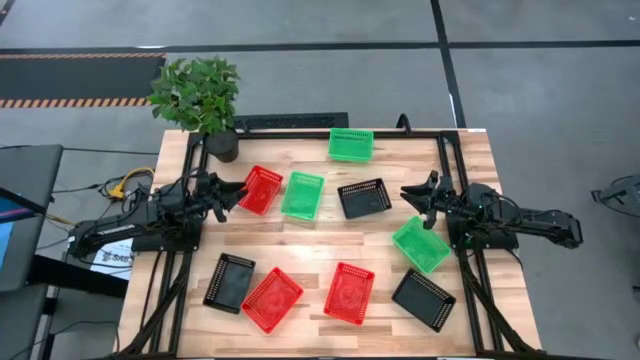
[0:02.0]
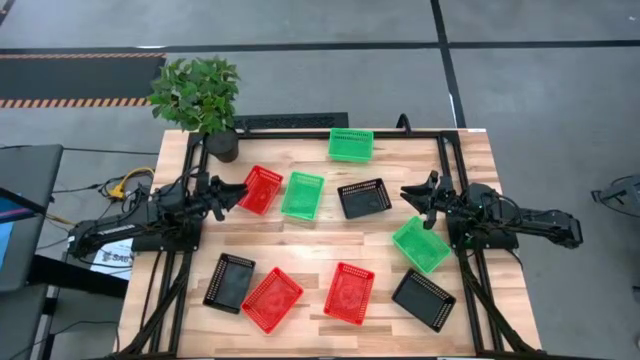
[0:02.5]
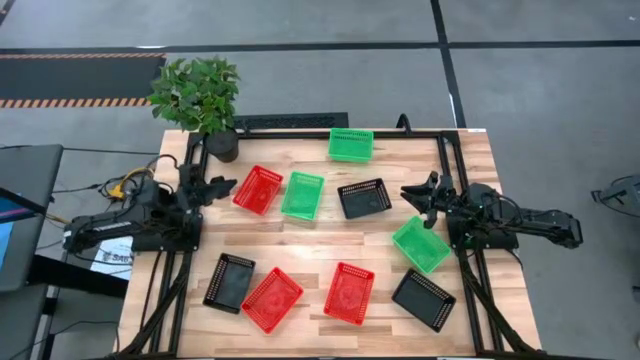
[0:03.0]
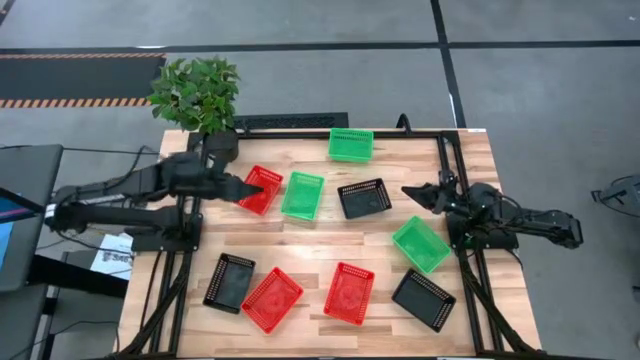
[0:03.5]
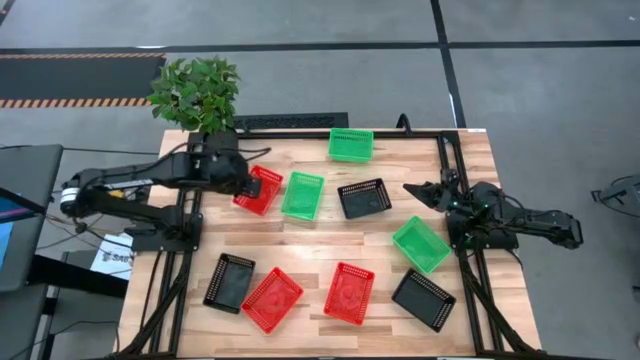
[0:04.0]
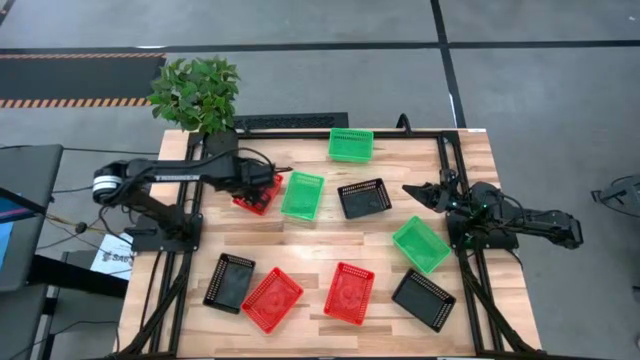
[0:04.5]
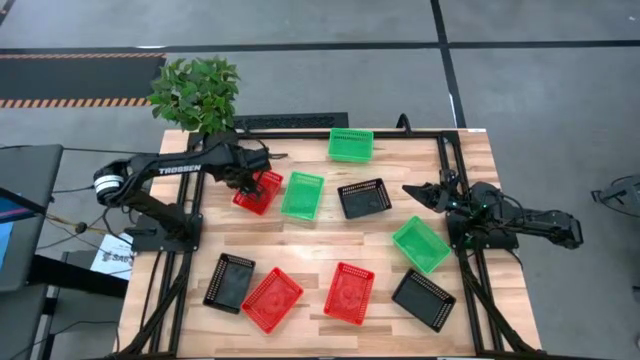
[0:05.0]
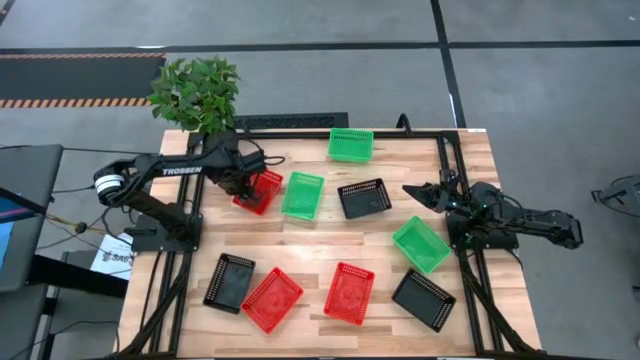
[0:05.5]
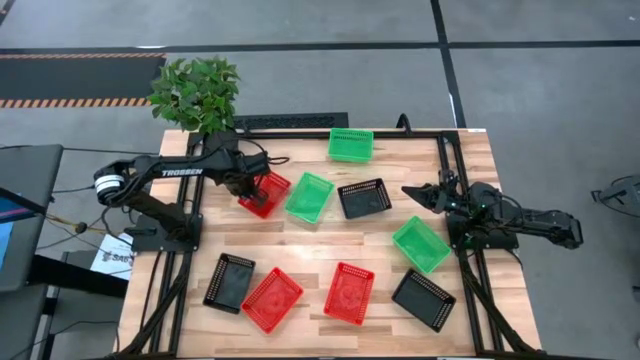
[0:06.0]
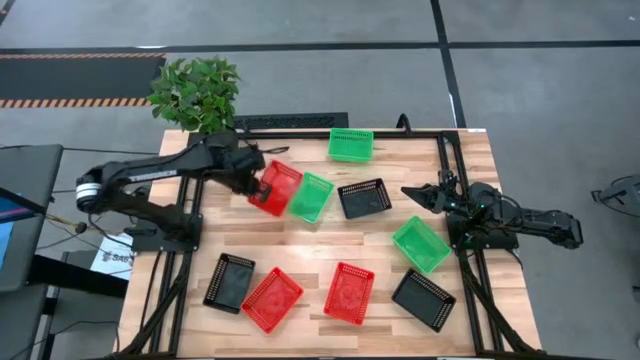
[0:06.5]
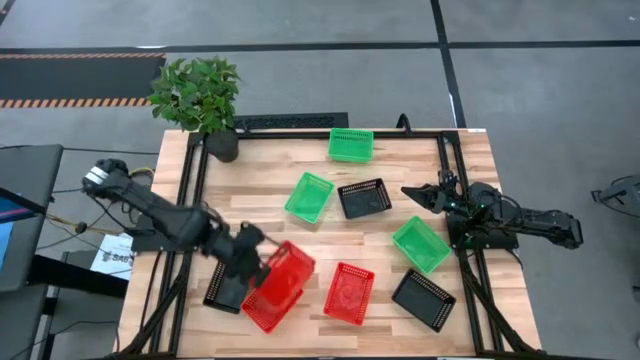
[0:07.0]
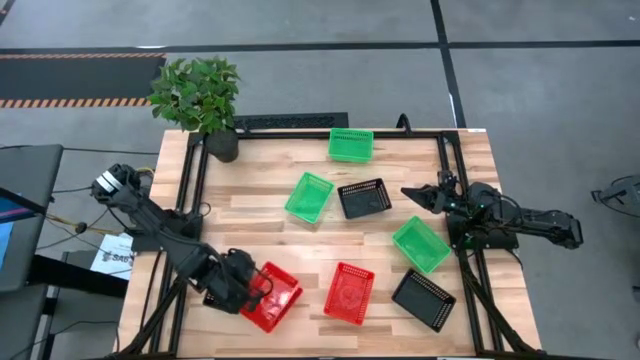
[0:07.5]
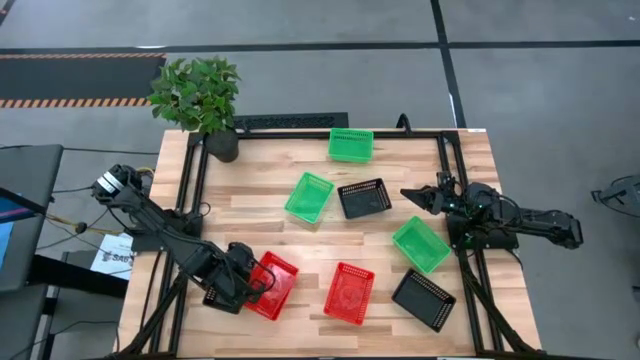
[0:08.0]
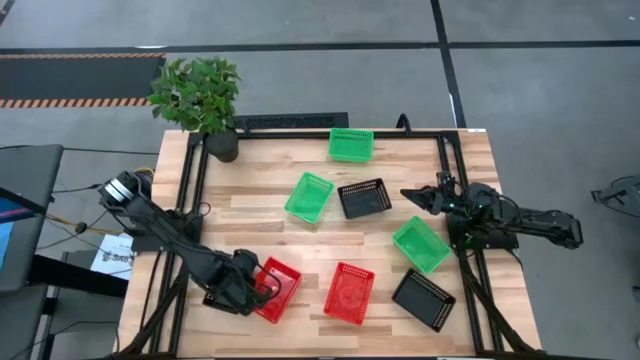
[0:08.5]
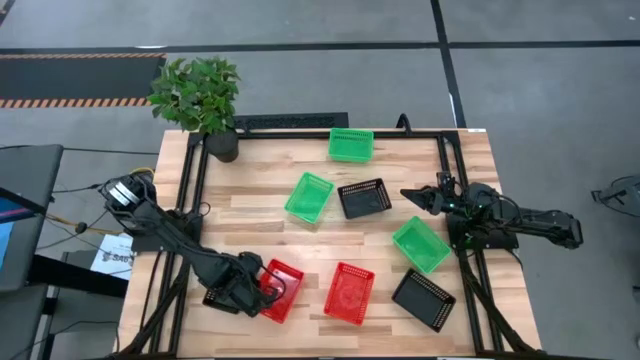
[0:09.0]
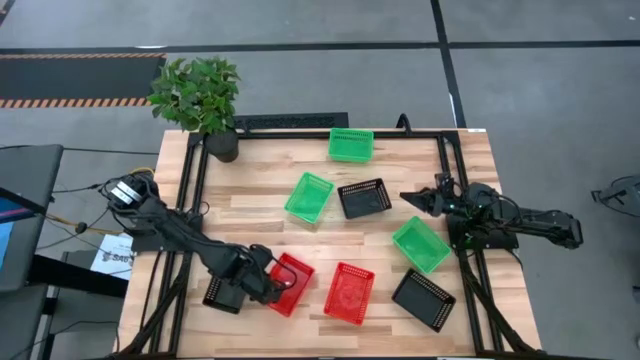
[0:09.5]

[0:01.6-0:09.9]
Stack the top red bin on top of the bottom left red bin

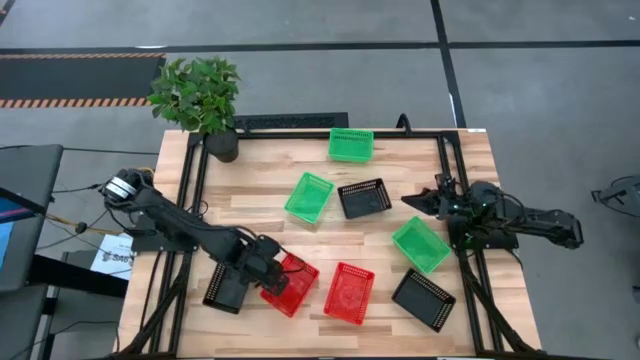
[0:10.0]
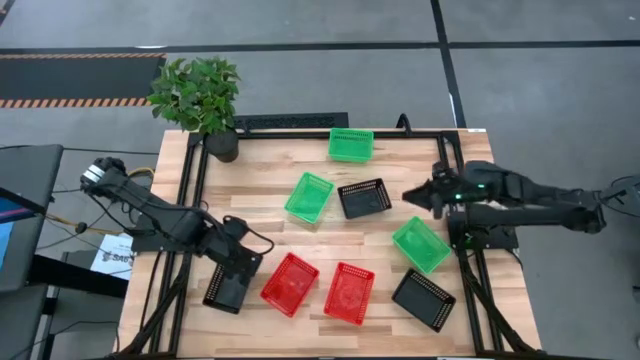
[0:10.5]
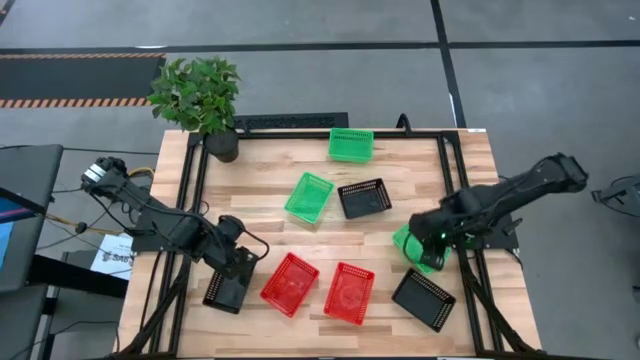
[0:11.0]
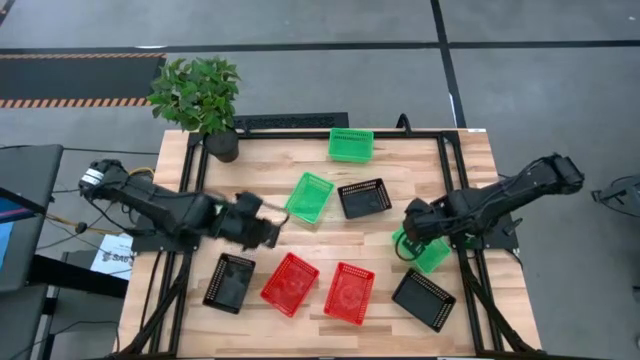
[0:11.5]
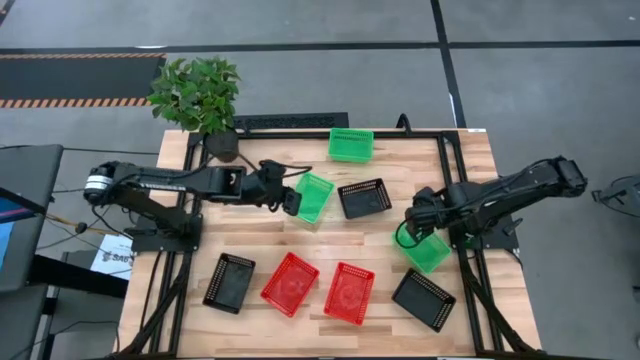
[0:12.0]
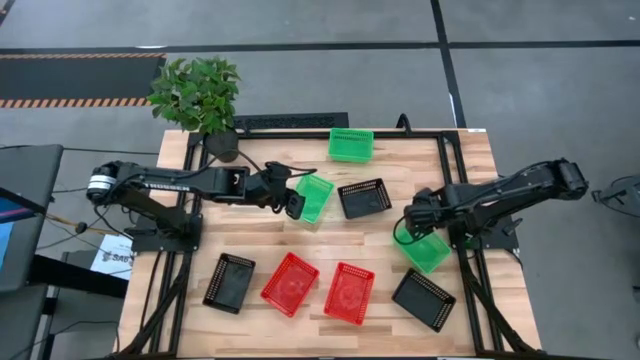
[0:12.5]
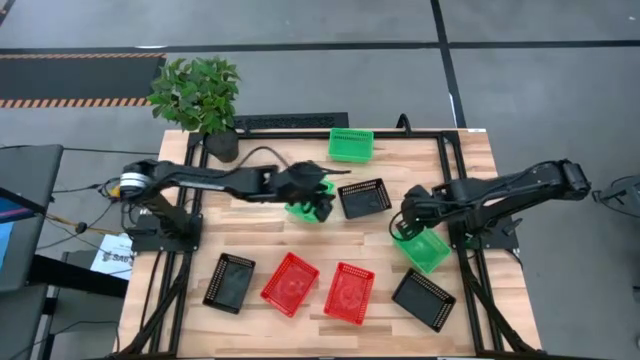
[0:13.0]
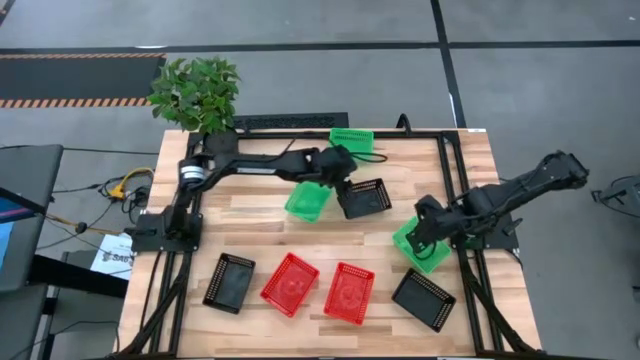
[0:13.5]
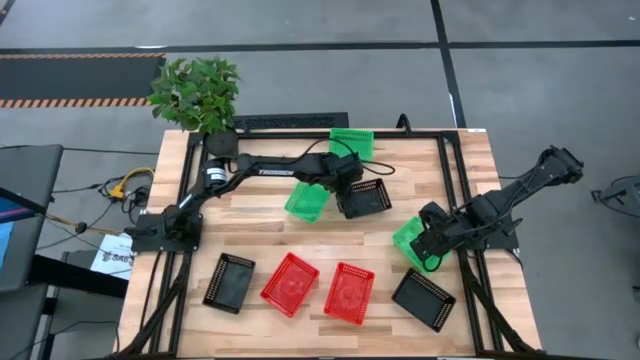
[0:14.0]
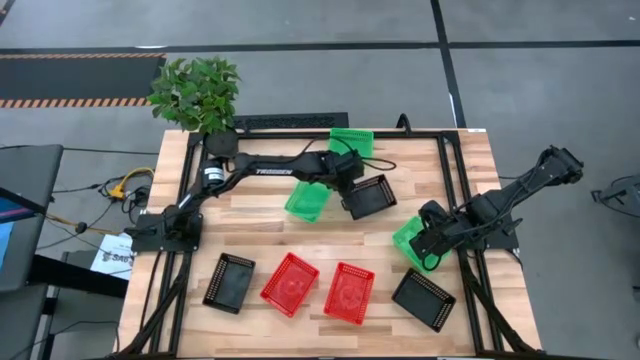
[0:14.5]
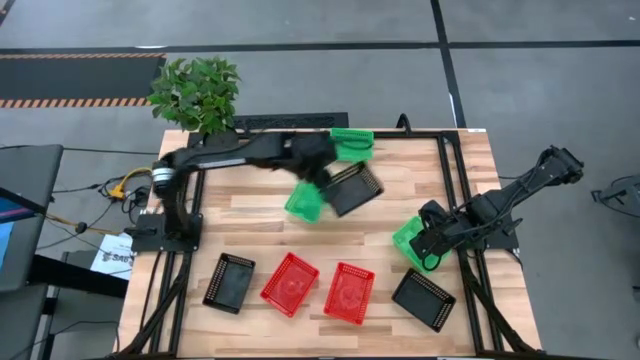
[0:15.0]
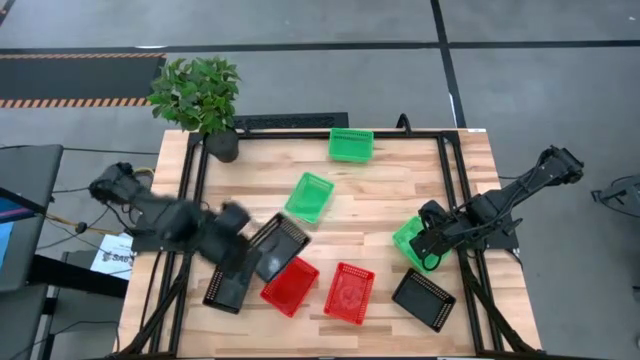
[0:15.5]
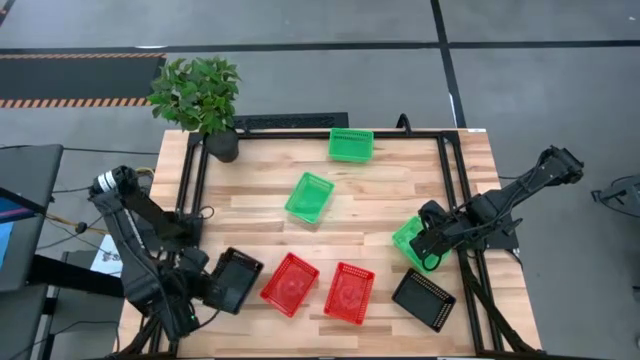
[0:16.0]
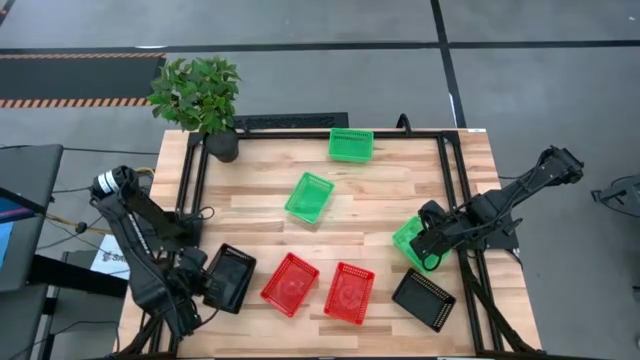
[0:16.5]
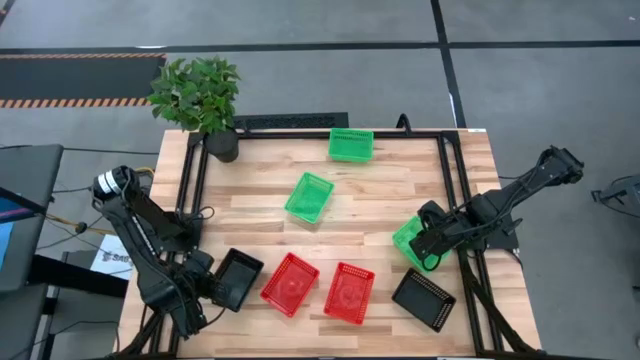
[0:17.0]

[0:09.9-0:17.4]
Stack the top black bin on top of the bottom left black bin

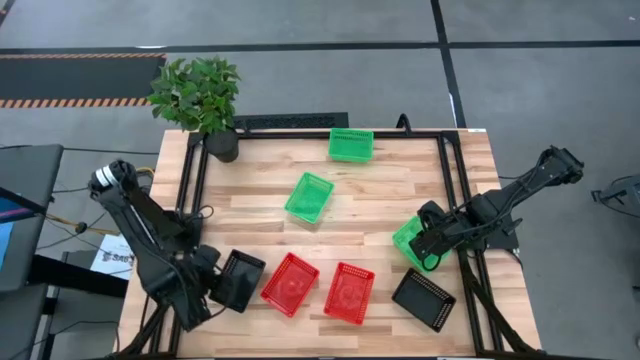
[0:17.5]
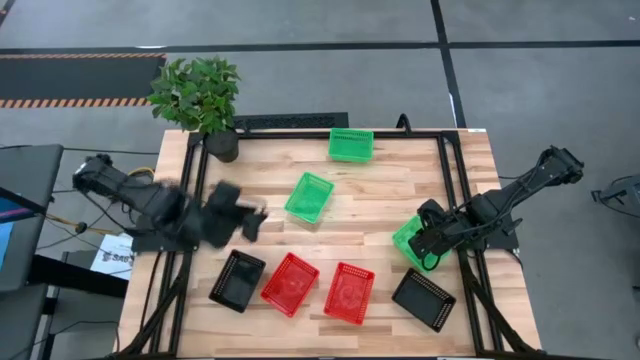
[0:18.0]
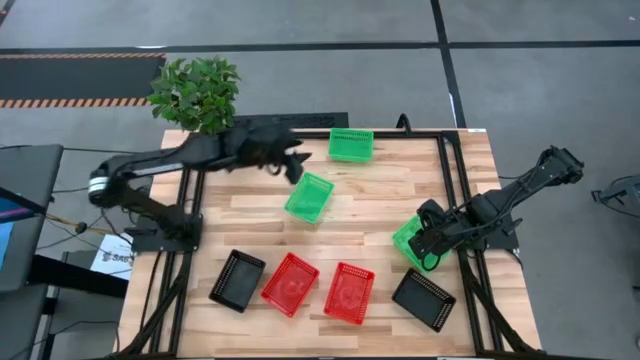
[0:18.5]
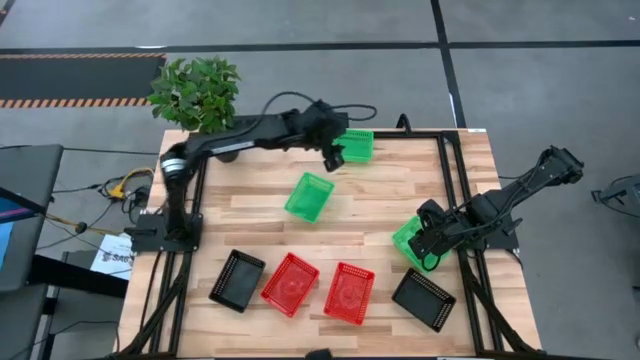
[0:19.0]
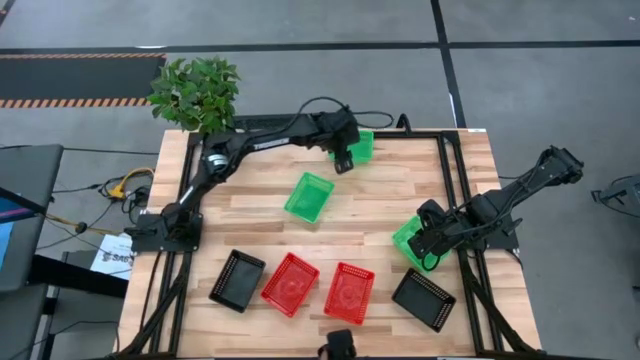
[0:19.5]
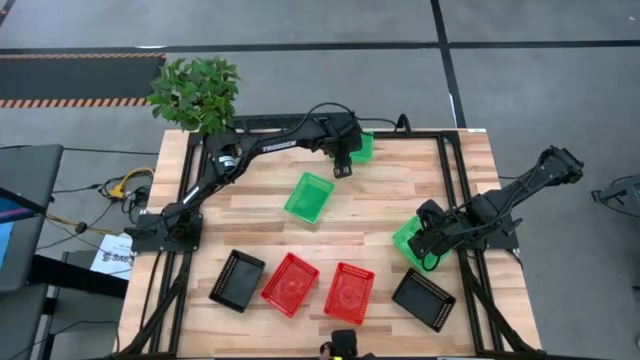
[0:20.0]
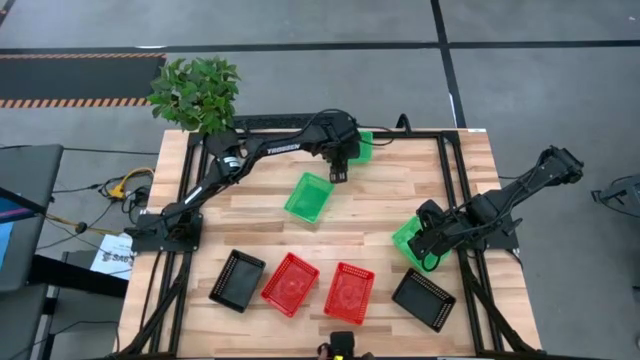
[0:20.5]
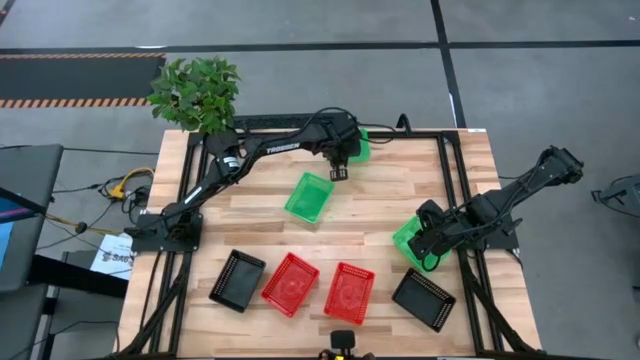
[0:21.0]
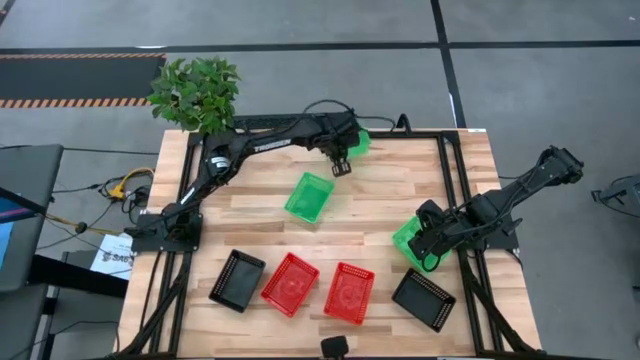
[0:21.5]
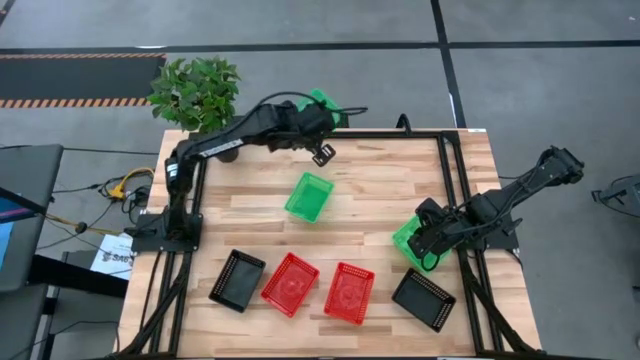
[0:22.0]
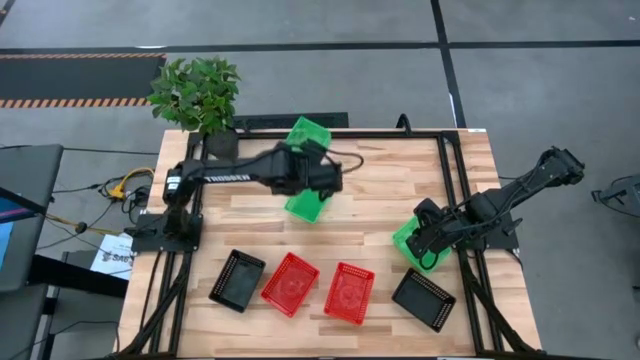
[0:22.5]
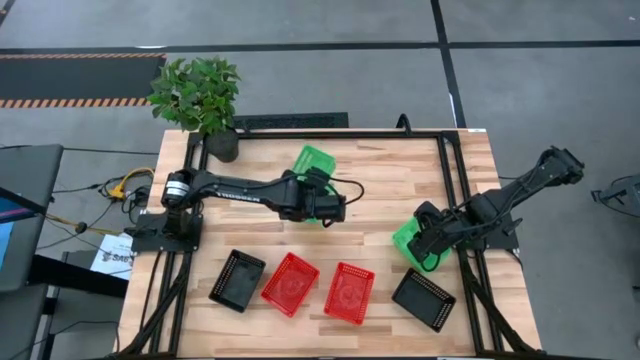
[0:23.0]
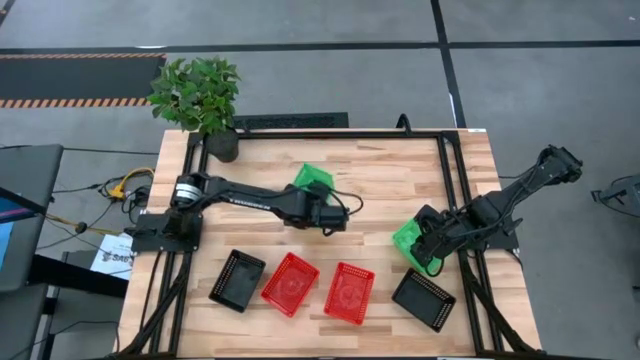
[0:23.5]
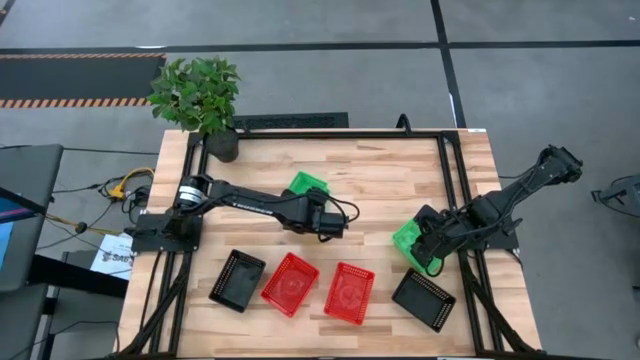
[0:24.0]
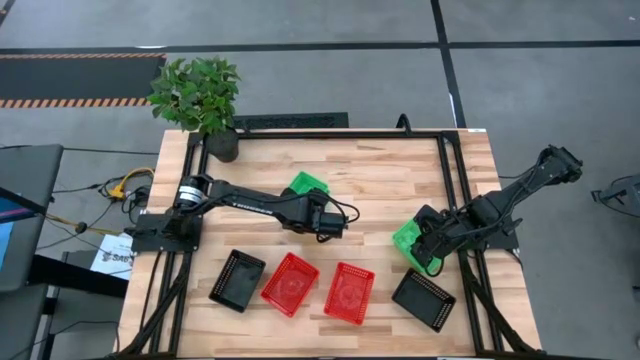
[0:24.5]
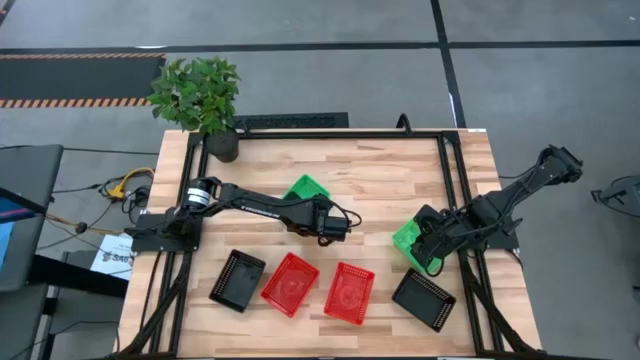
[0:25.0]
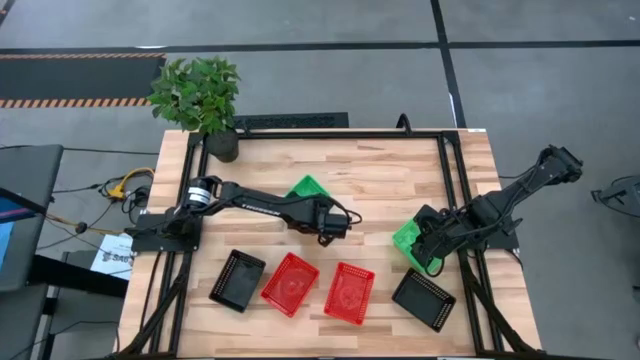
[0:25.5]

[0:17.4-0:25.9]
Stack the top green bin on top of the middle green bin
